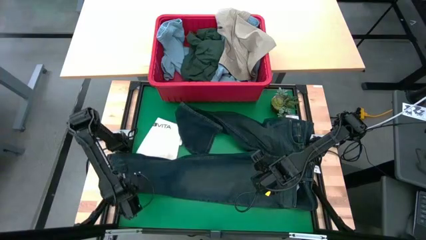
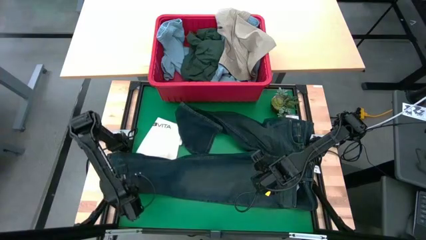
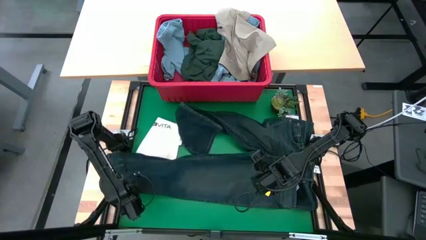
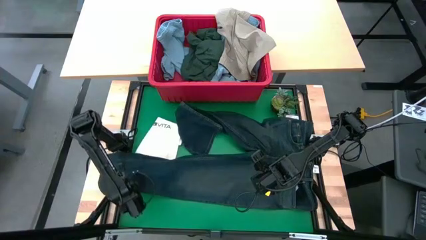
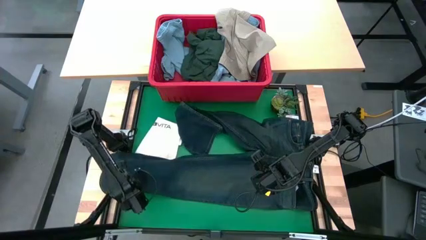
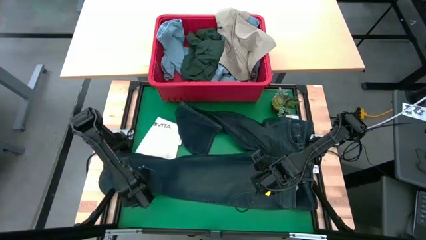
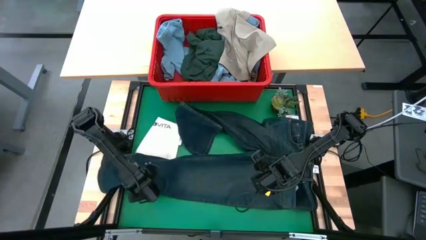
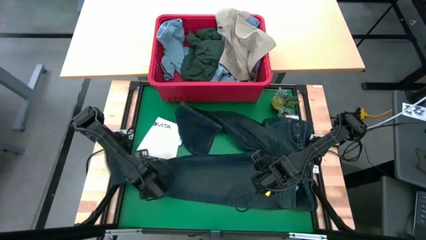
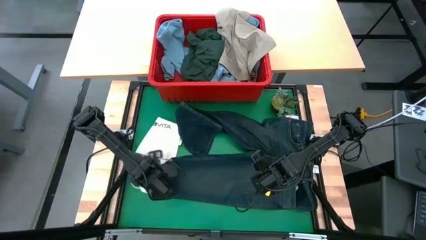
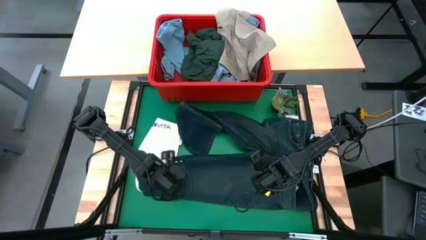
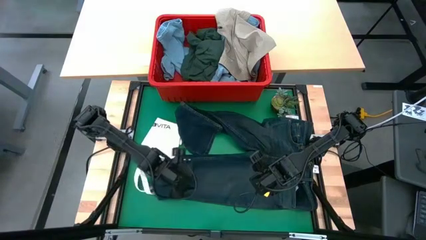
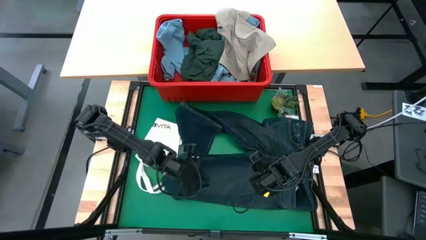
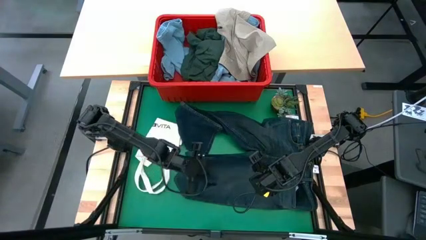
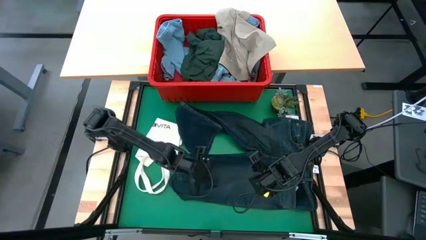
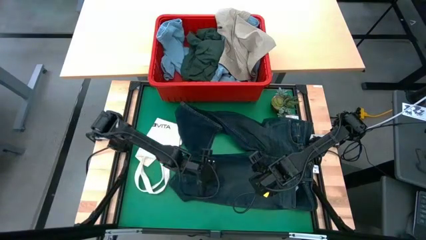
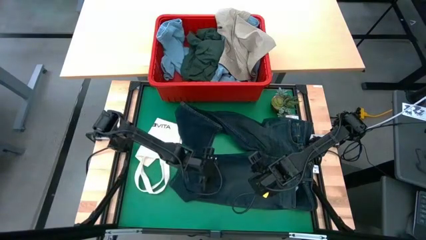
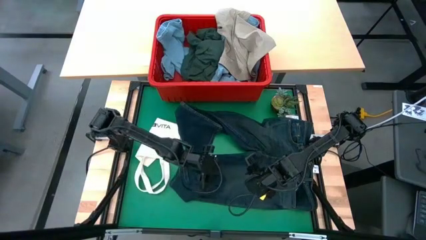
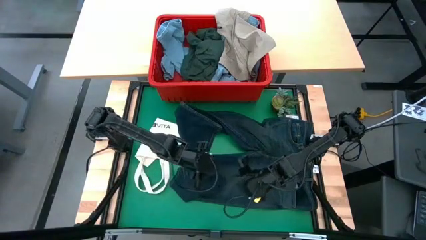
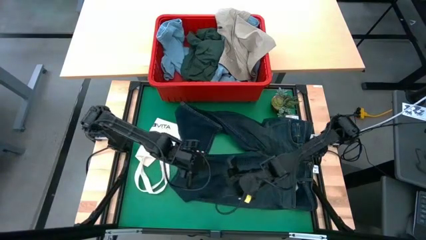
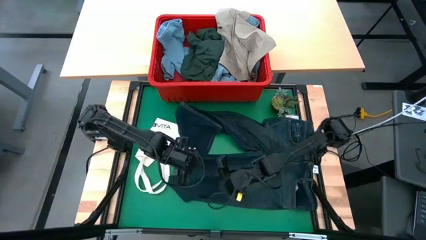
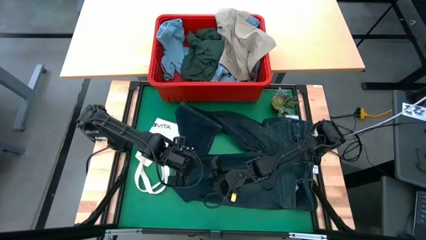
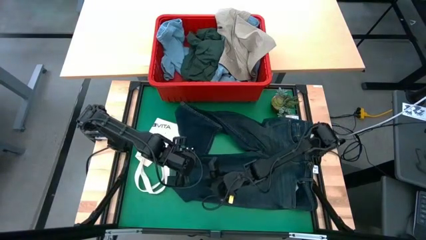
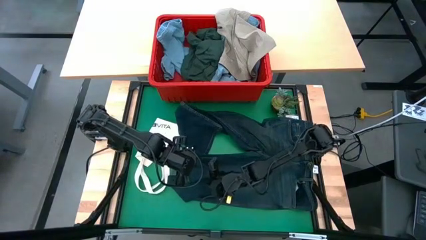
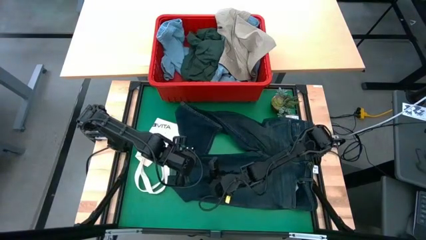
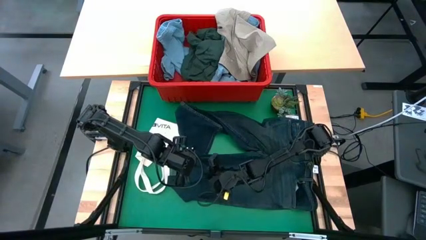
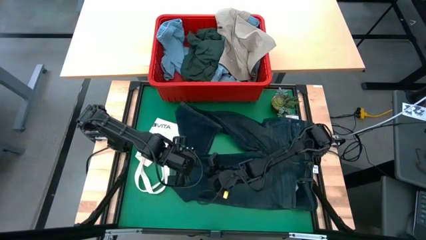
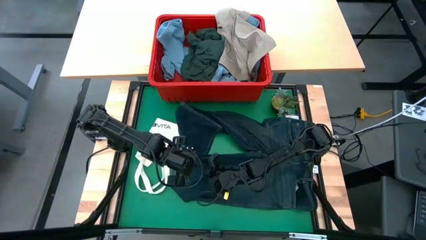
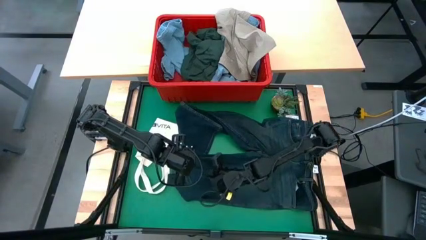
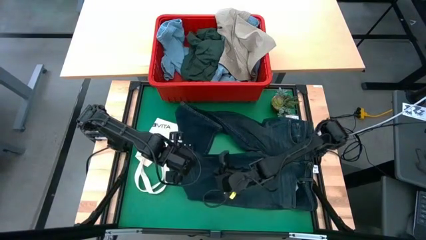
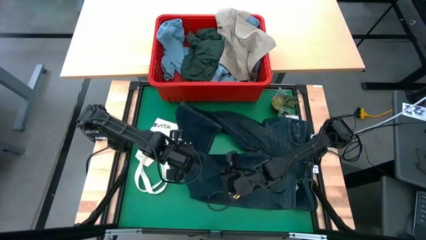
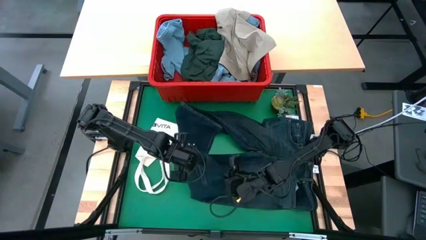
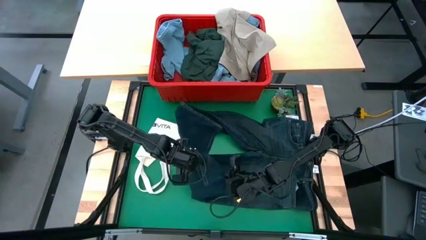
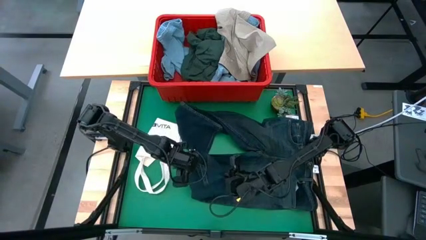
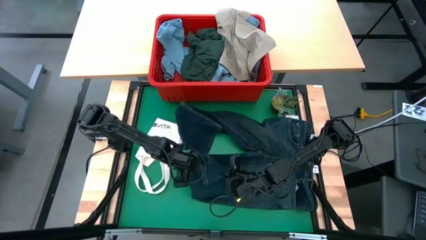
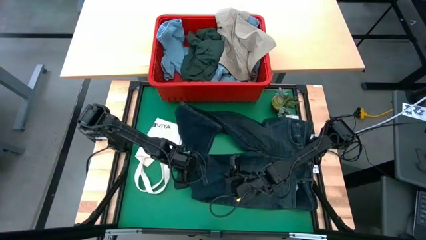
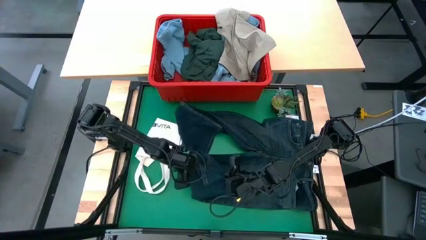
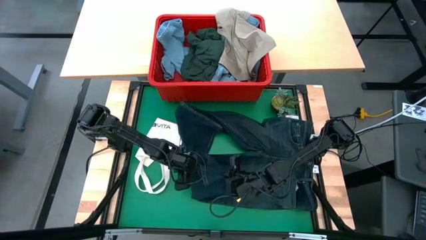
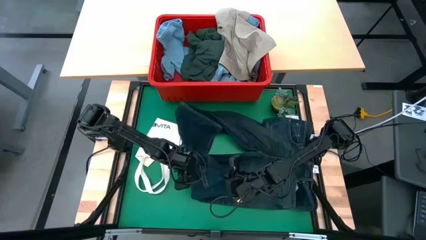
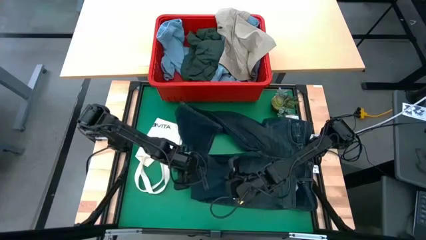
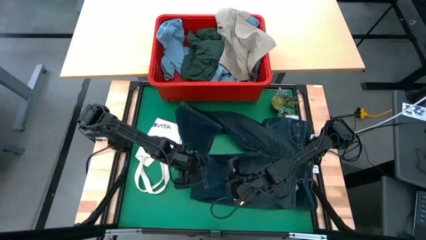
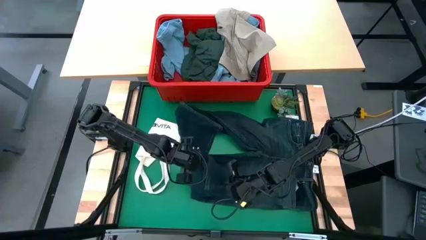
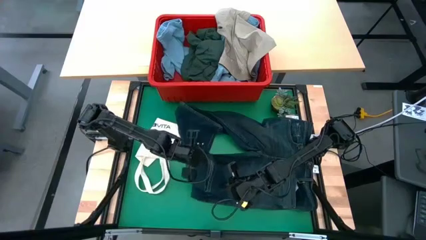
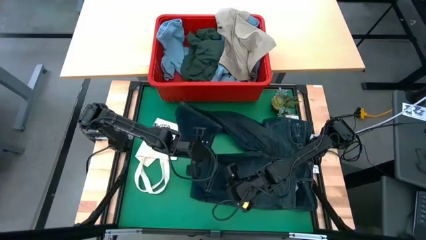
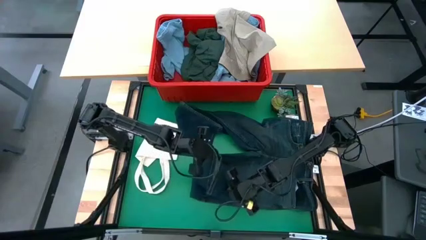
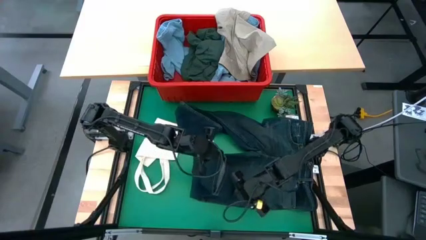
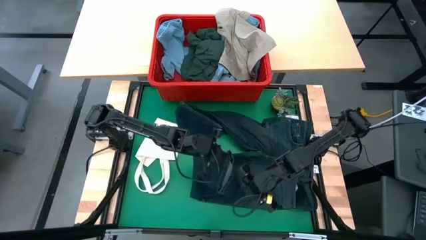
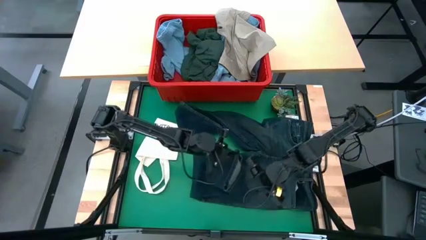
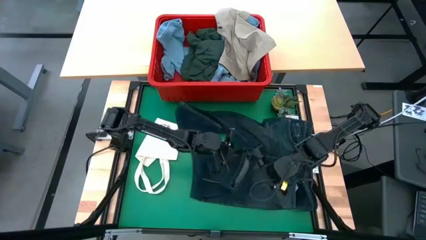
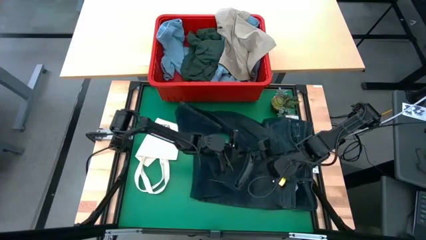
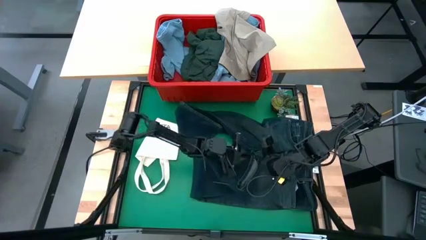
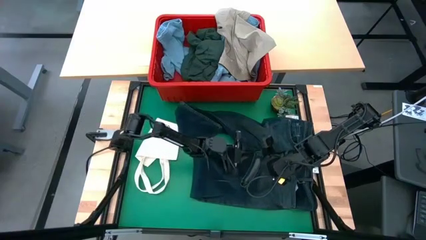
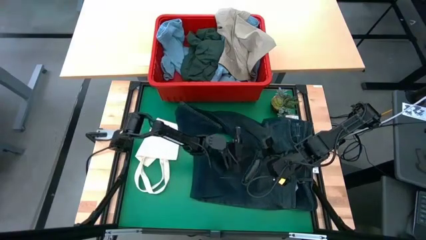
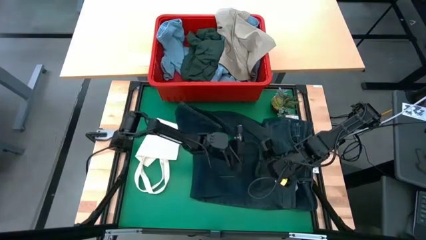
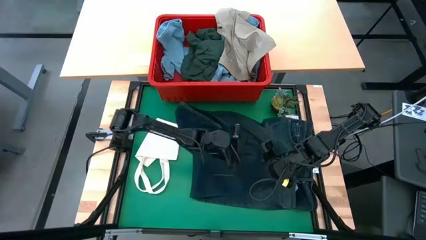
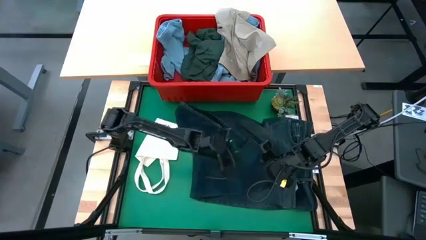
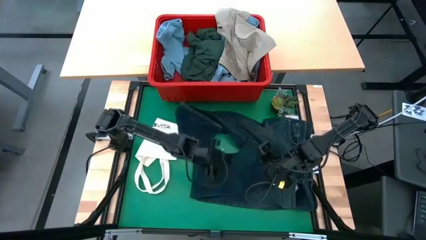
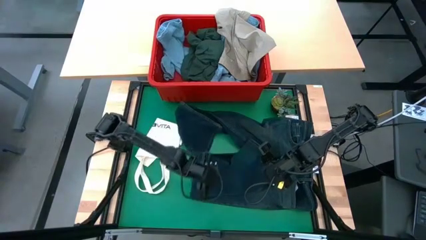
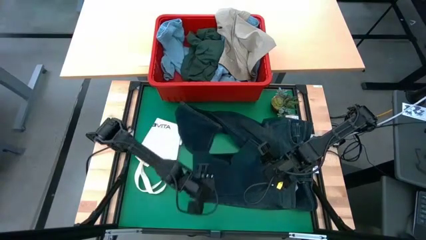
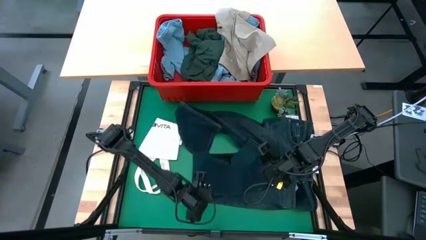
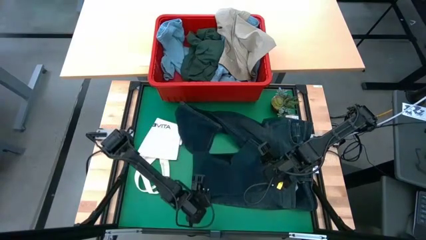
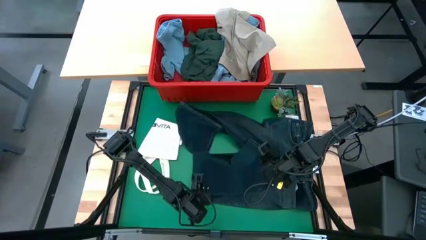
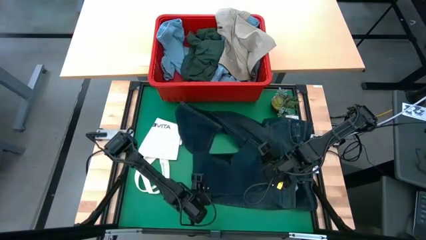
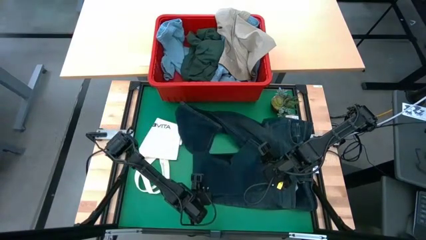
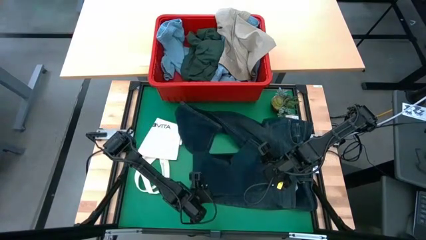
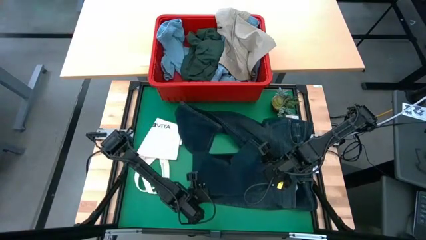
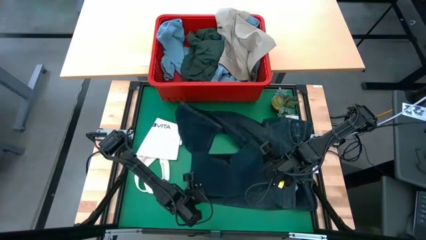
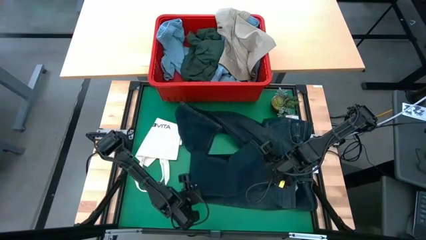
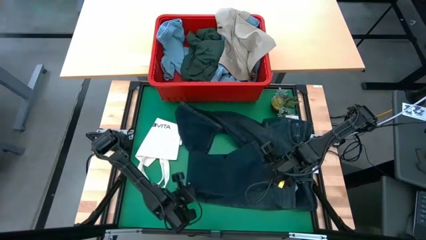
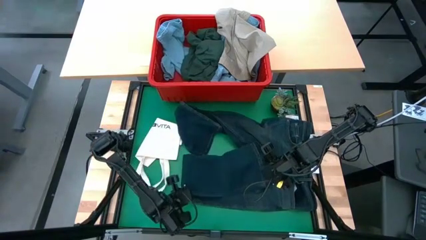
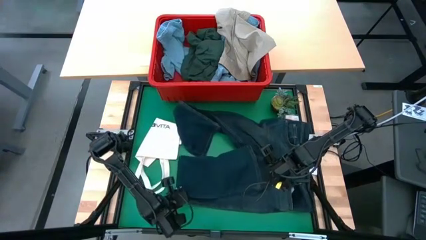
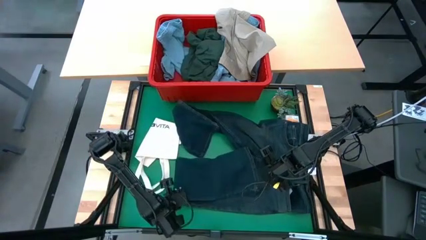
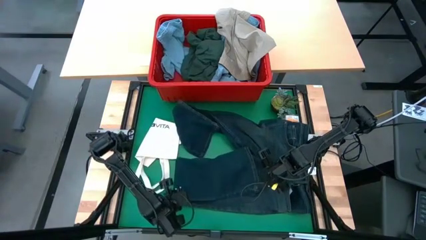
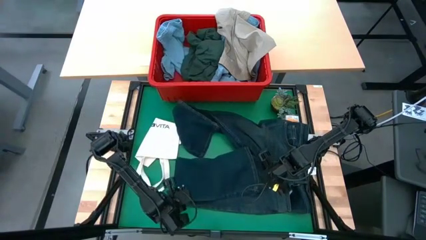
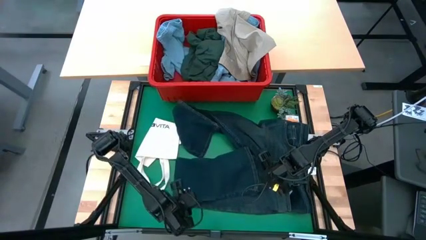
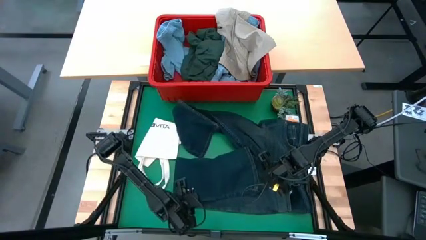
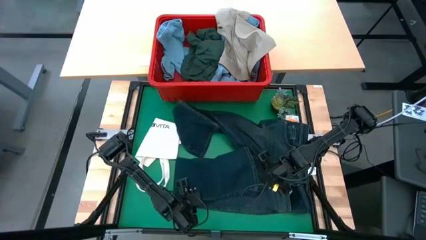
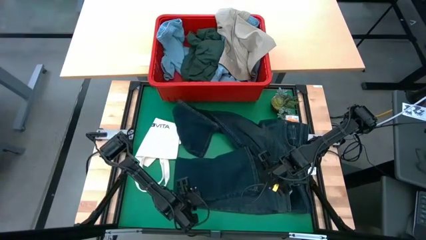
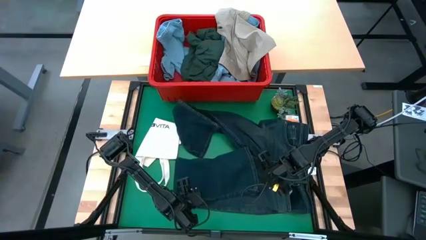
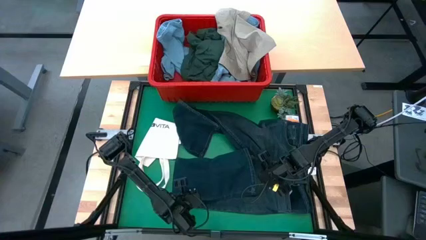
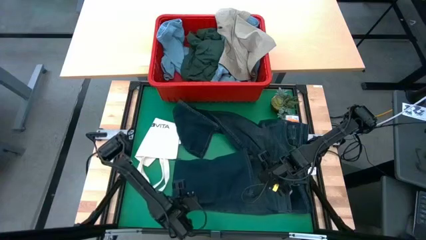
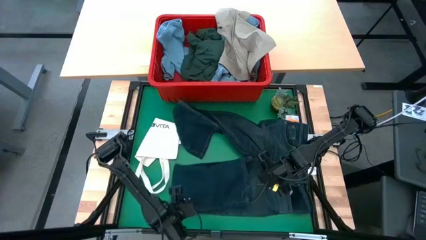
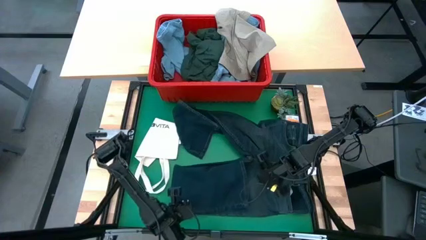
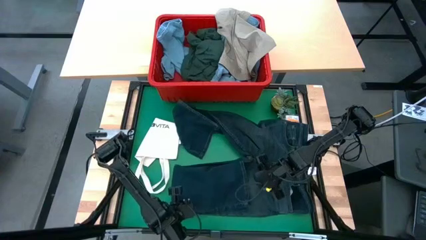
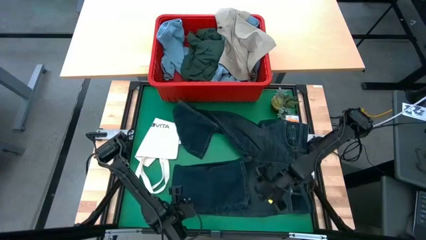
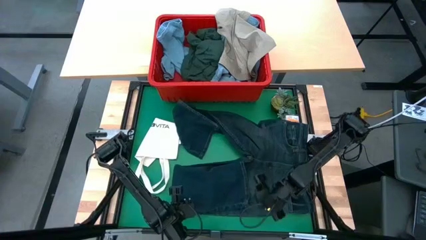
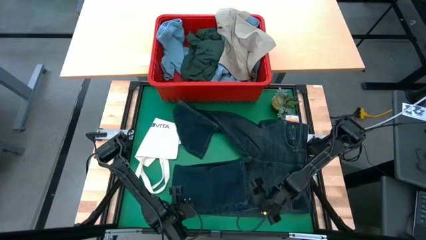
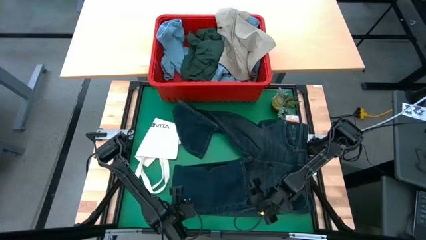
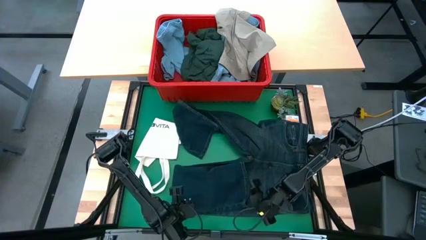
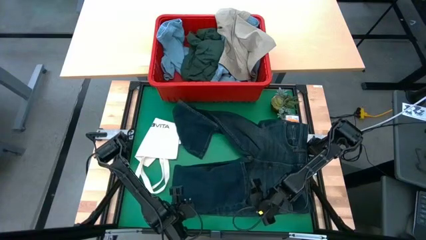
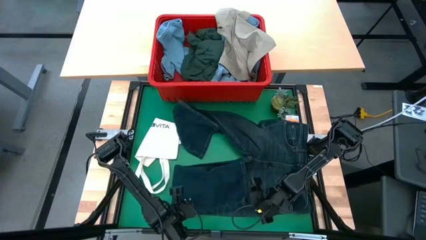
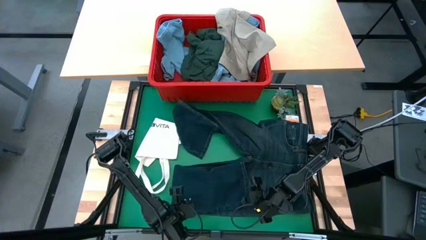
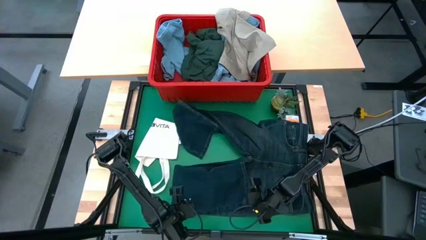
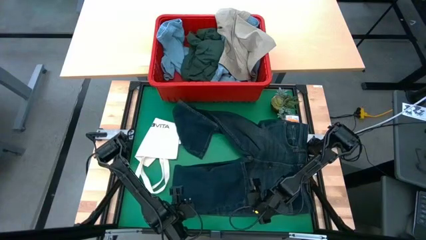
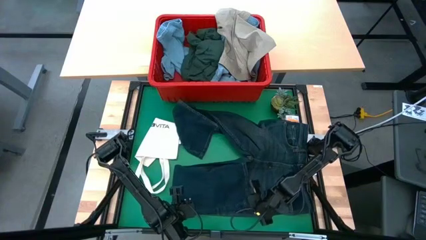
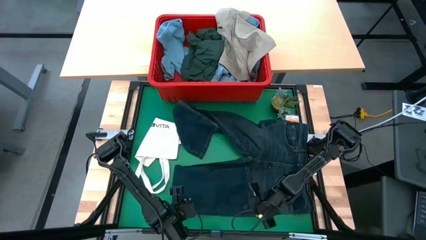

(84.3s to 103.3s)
Task: Fold laundry
Fold the dark blue pants
